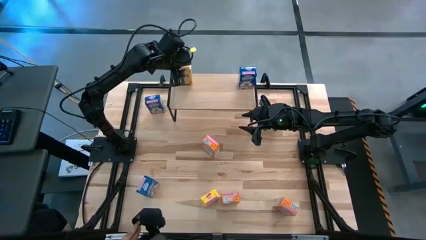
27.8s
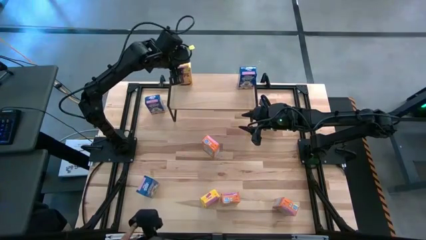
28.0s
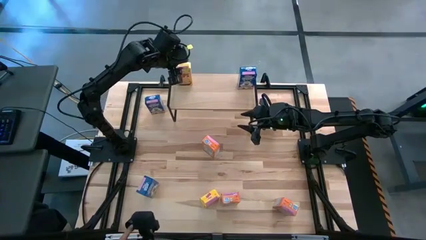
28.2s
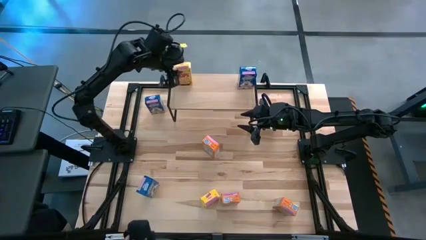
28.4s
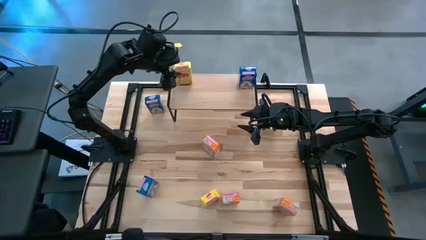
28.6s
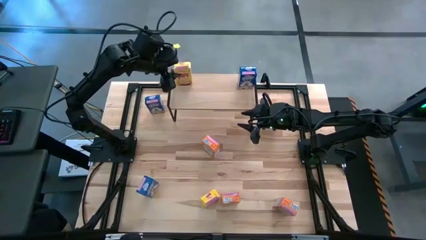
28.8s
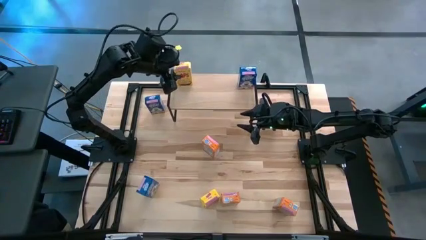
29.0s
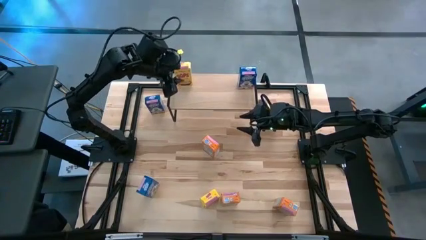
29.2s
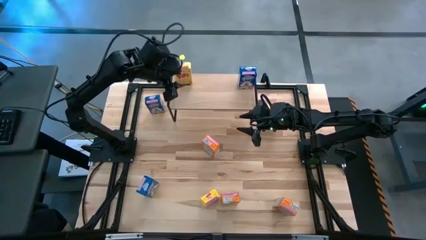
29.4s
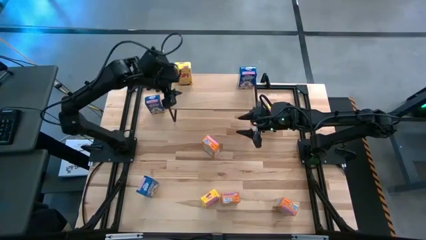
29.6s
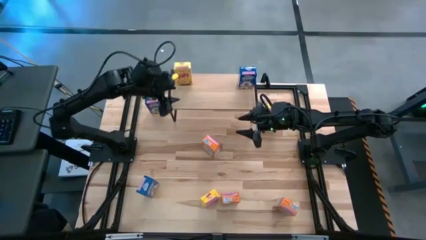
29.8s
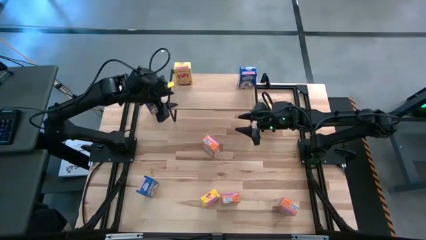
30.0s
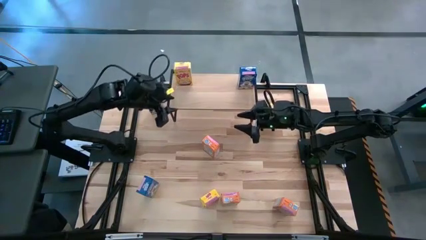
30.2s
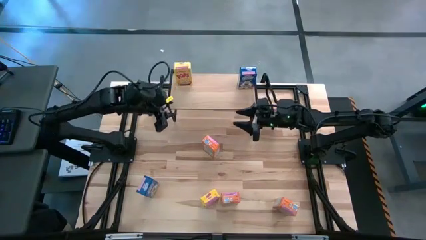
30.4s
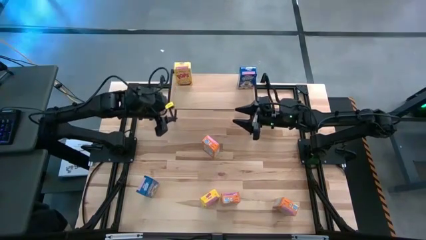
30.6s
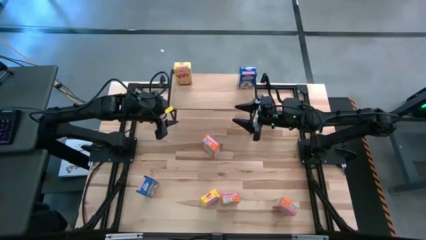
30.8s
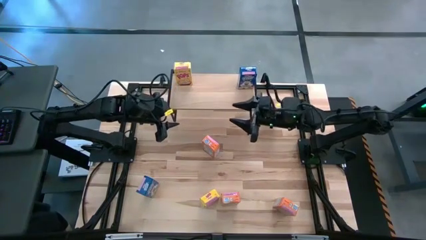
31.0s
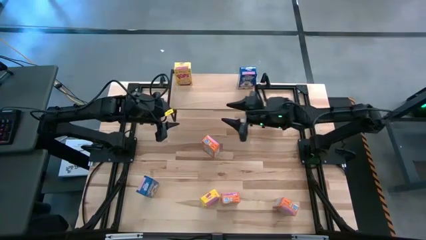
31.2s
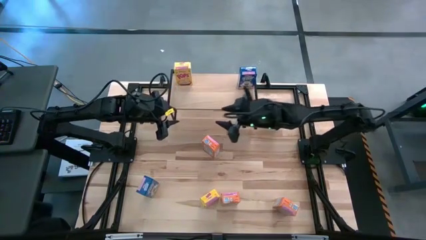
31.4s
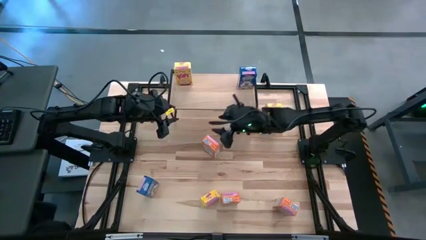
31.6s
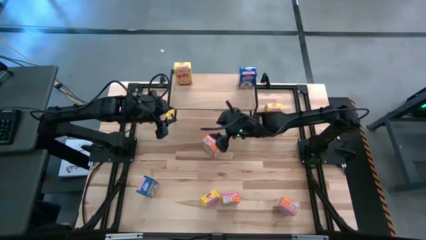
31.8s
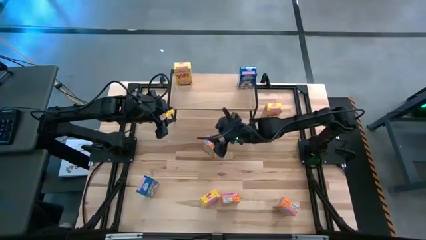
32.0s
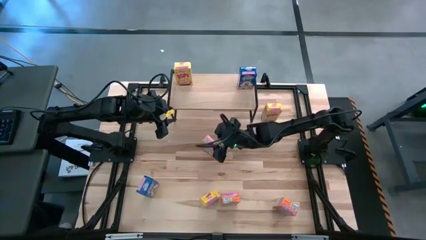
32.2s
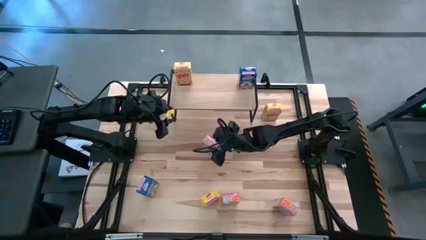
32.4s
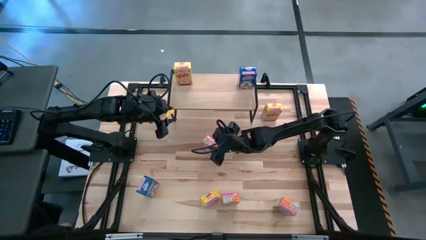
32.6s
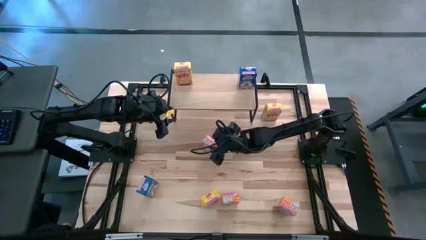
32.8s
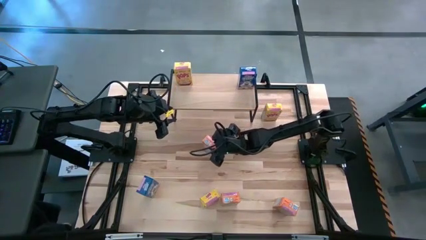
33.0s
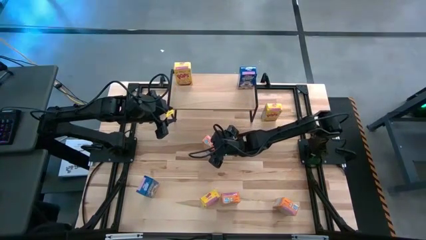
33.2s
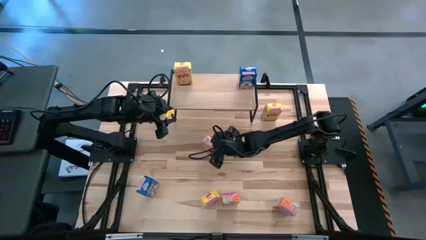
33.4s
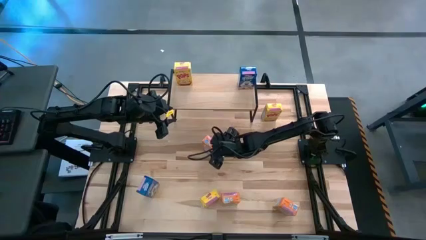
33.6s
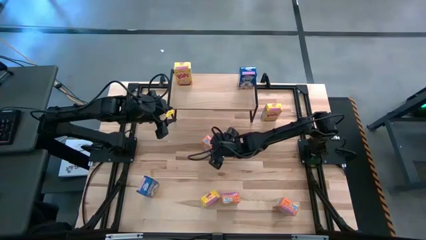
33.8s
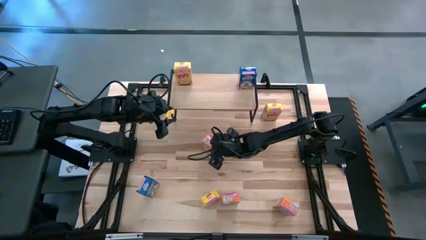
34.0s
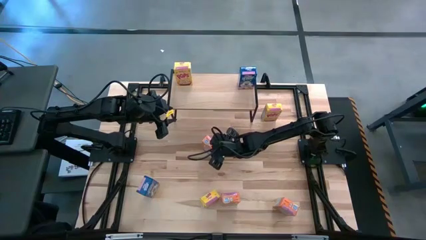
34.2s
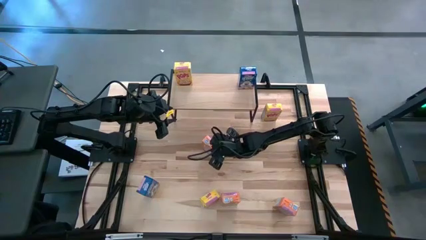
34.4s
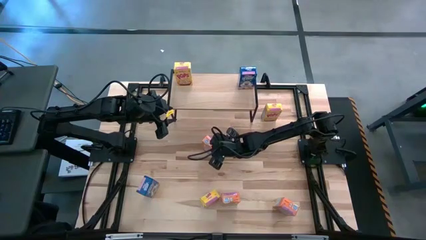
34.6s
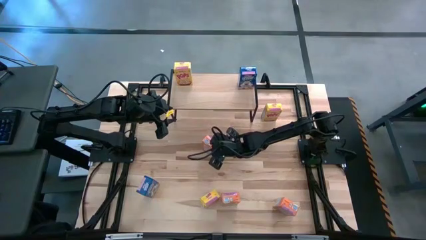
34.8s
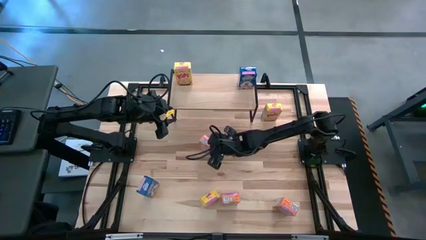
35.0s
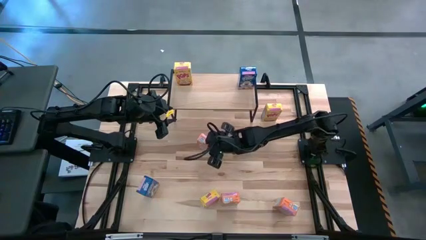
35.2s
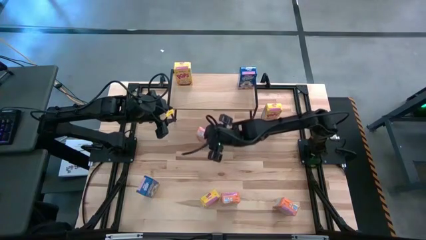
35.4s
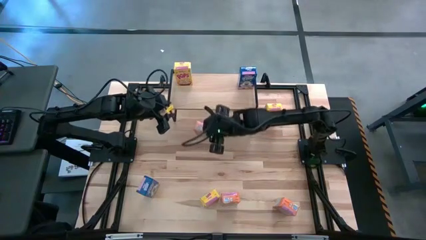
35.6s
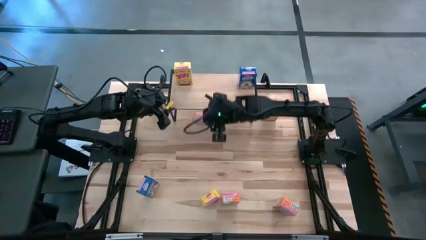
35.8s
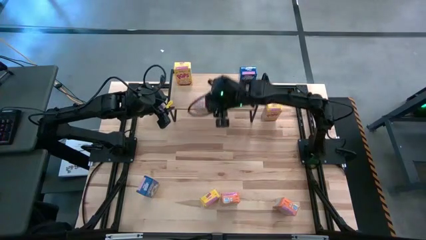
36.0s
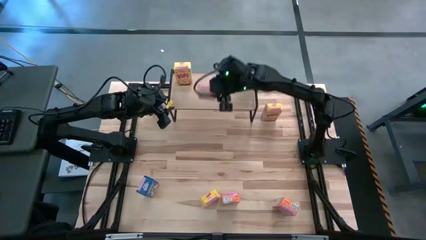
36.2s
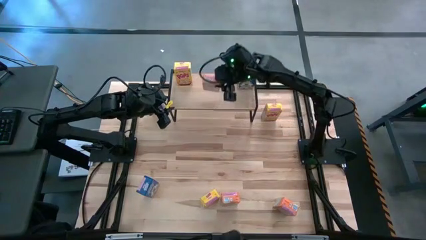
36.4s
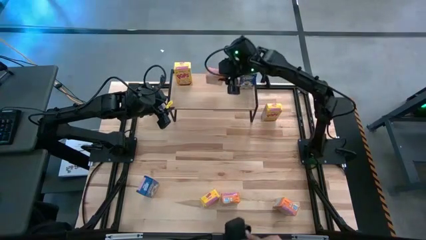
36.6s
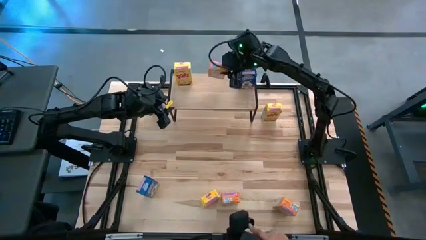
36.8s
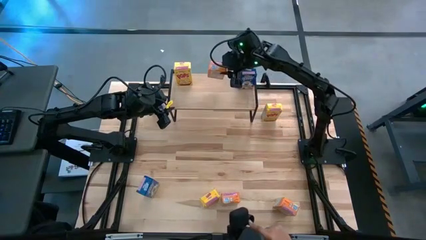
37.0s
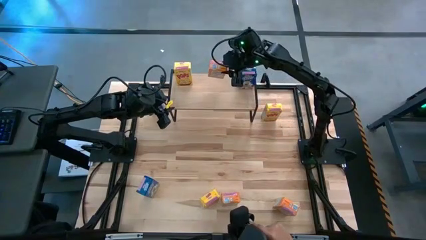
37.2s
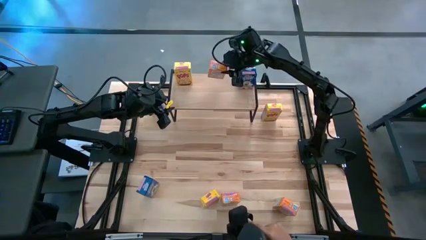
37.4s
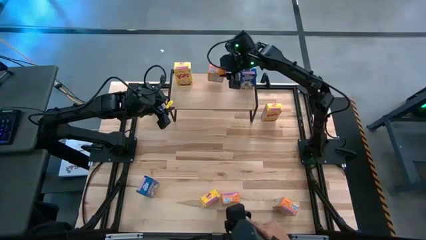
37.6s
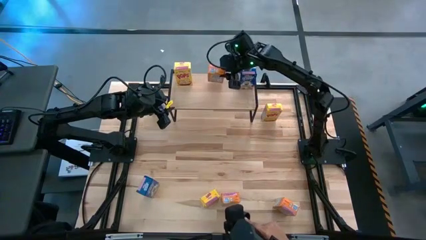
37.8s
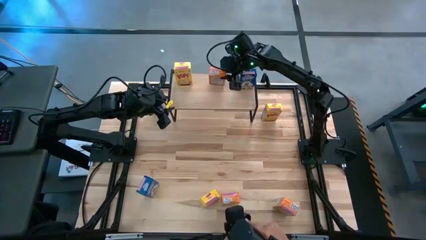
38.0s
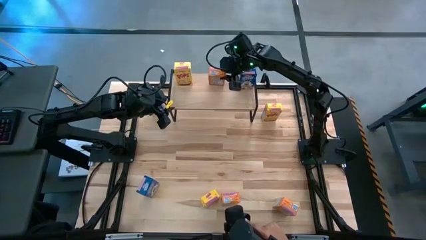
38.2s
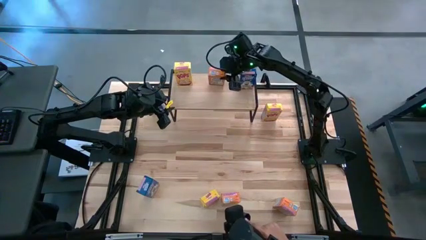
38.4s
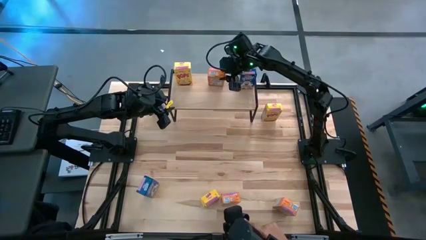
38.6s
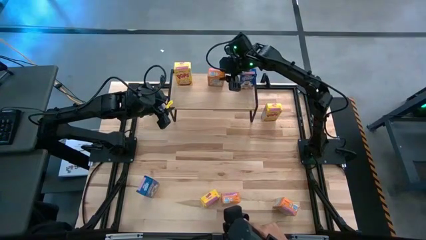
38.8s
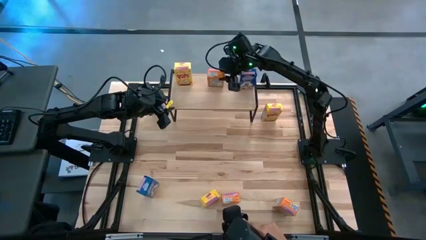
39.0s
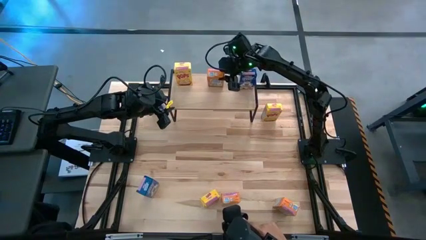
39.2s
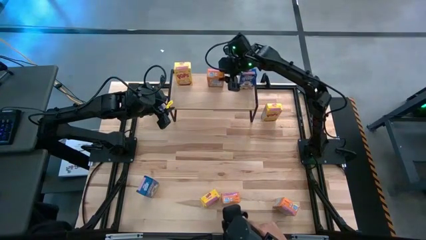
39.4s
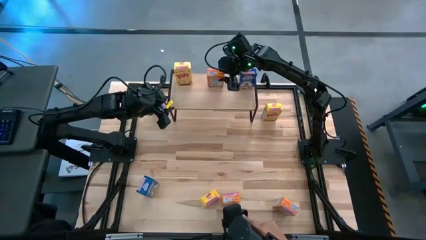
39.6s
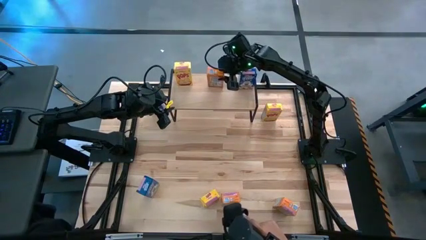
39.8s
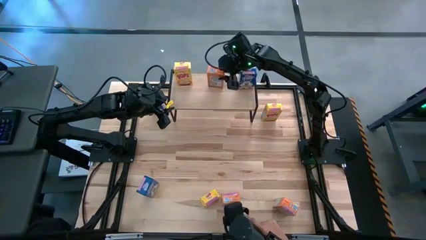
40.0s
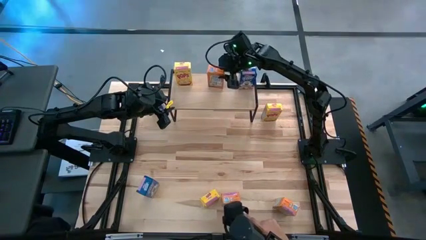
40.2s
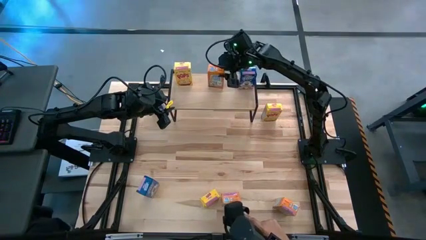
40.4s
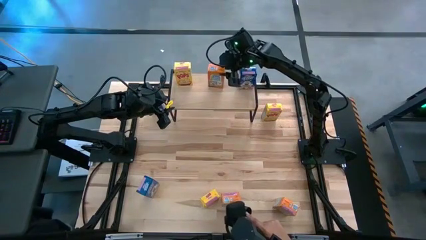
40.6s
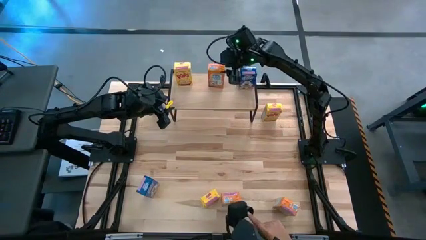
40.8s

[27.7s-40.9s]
Task: Stack cereal on shelf
Put the top left orange cereal box on the shelf
